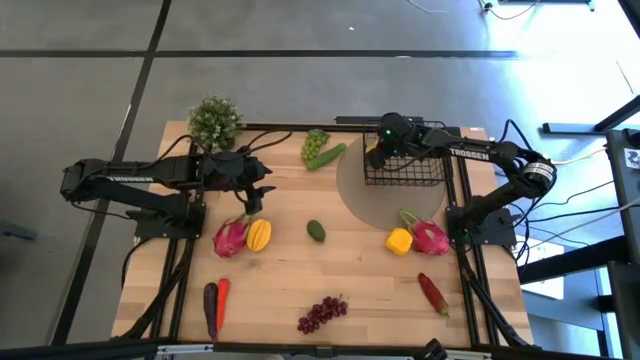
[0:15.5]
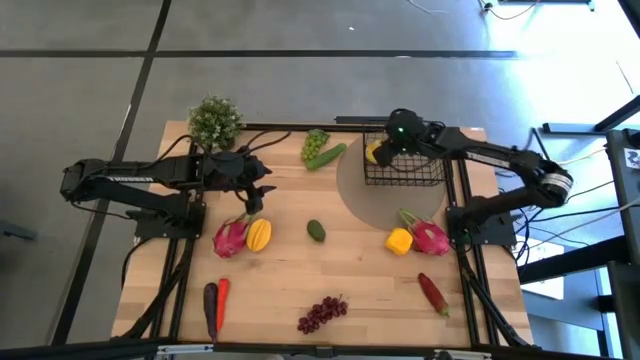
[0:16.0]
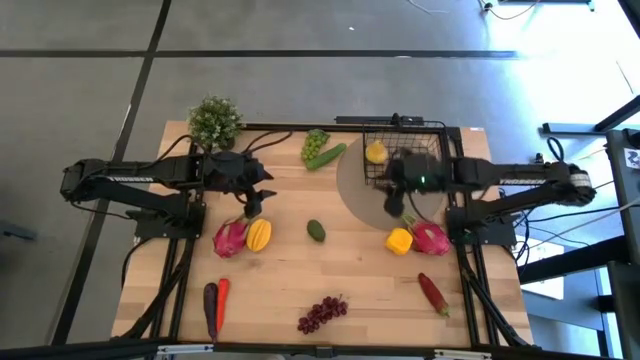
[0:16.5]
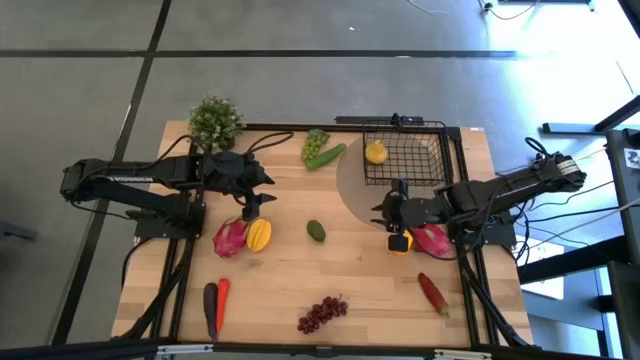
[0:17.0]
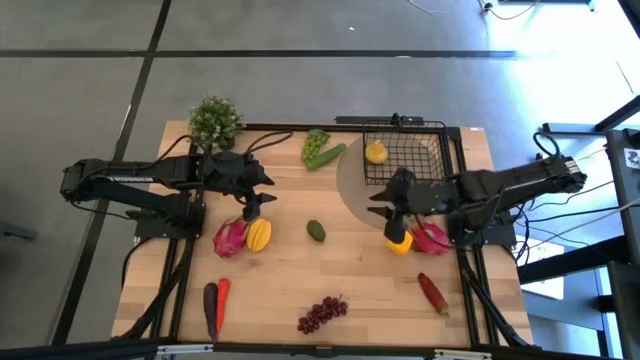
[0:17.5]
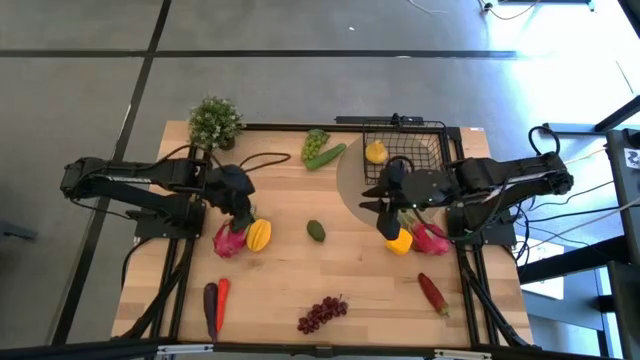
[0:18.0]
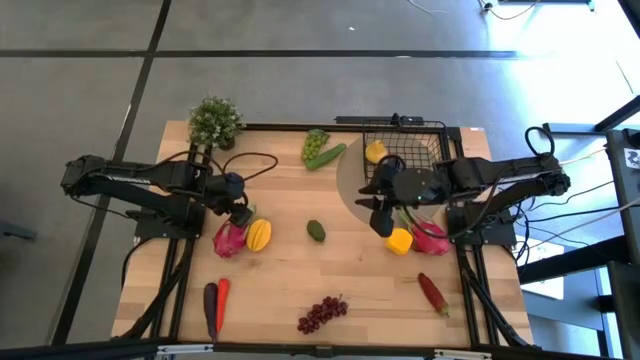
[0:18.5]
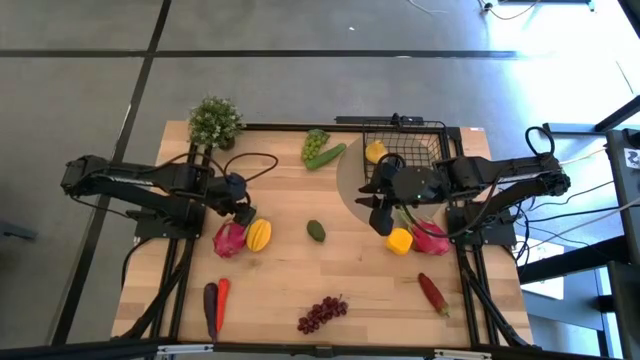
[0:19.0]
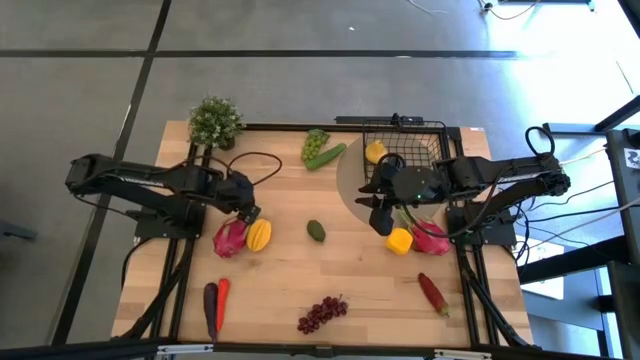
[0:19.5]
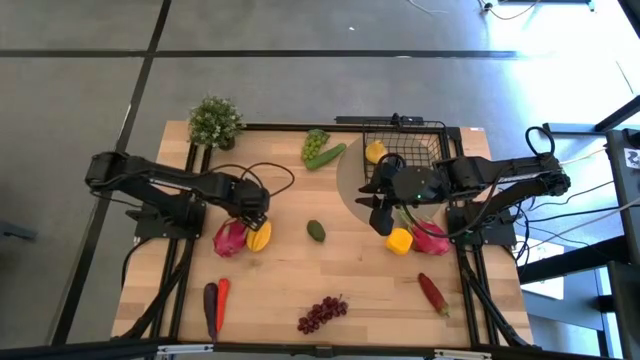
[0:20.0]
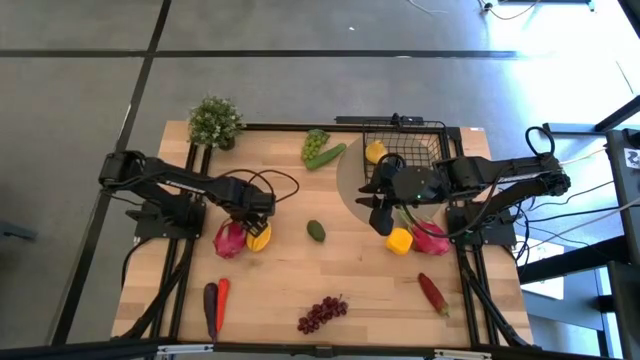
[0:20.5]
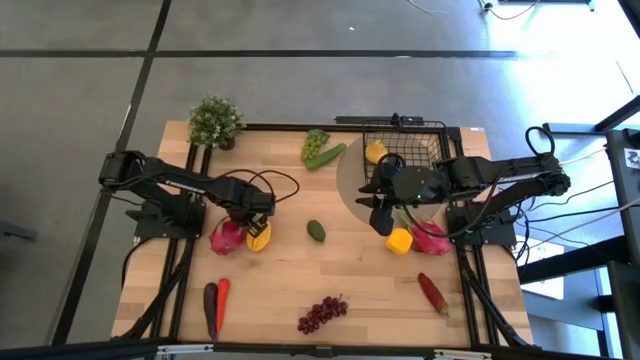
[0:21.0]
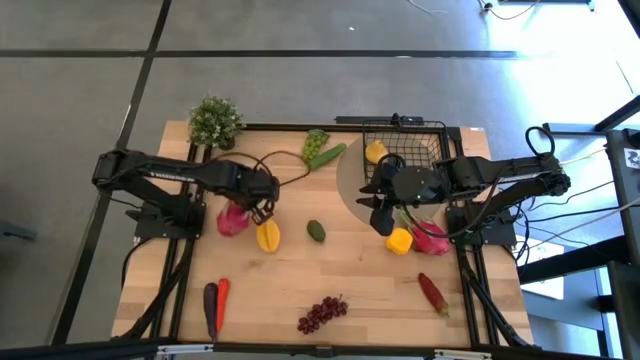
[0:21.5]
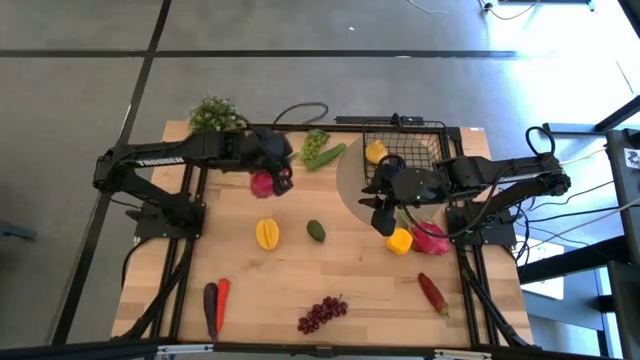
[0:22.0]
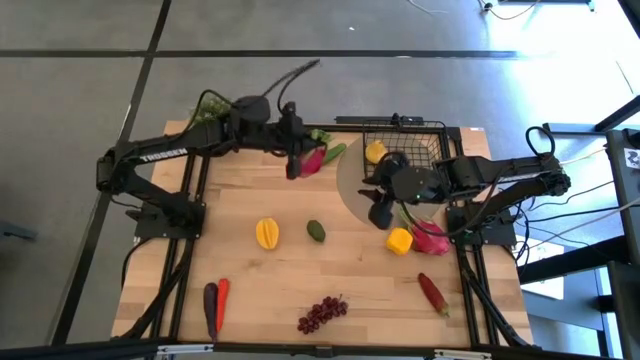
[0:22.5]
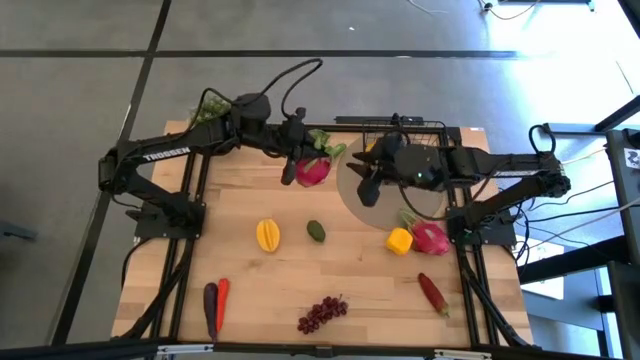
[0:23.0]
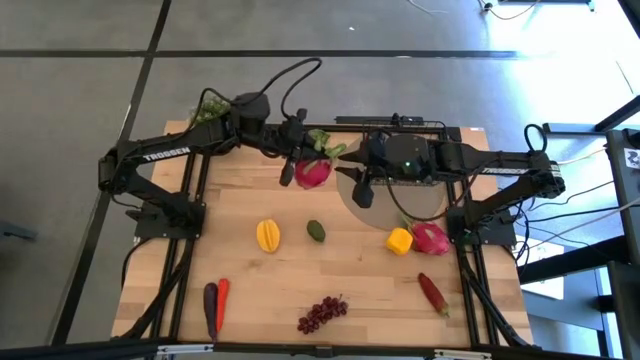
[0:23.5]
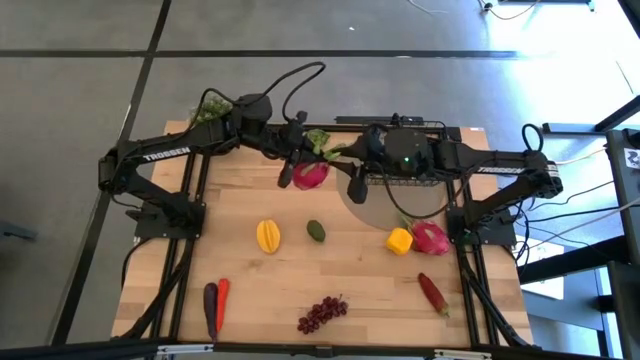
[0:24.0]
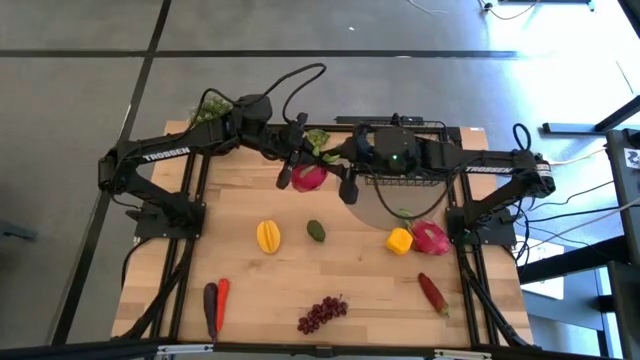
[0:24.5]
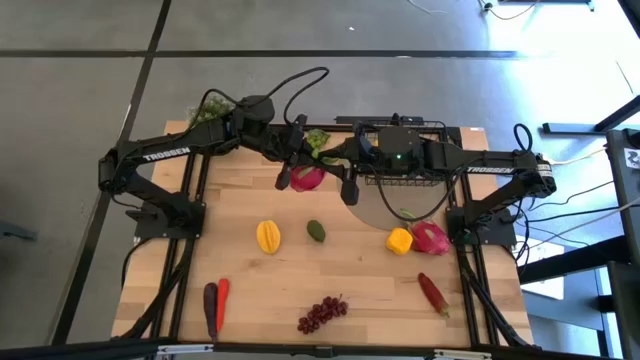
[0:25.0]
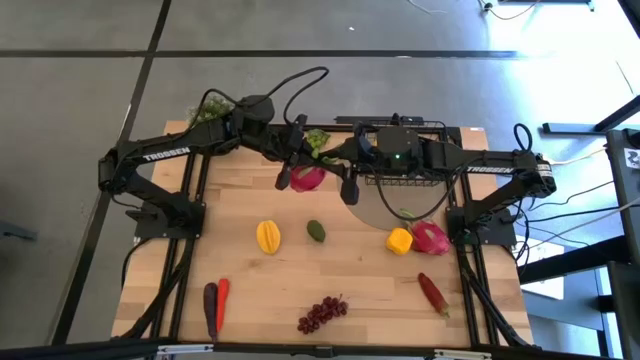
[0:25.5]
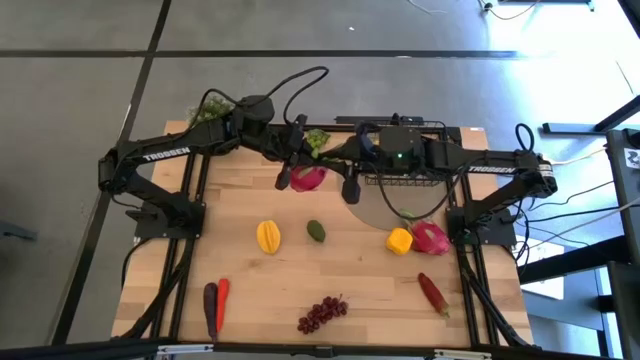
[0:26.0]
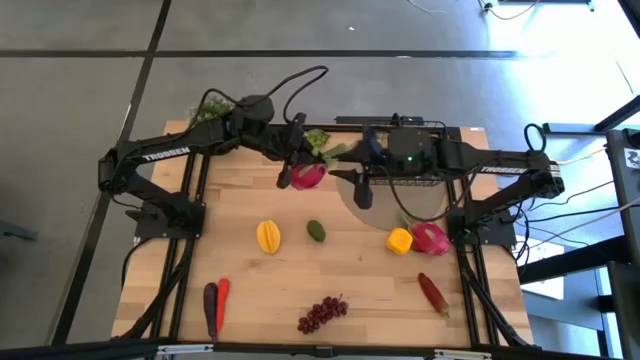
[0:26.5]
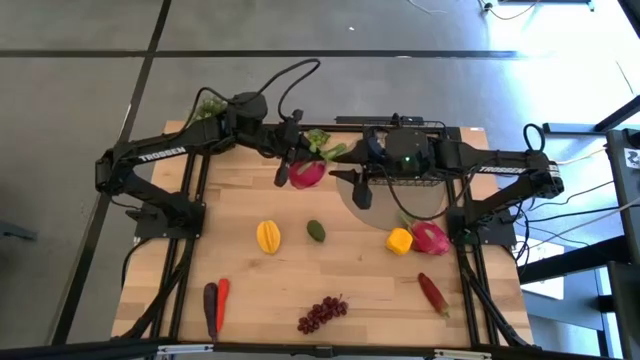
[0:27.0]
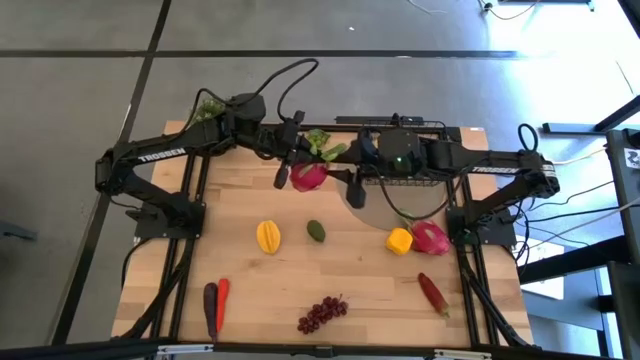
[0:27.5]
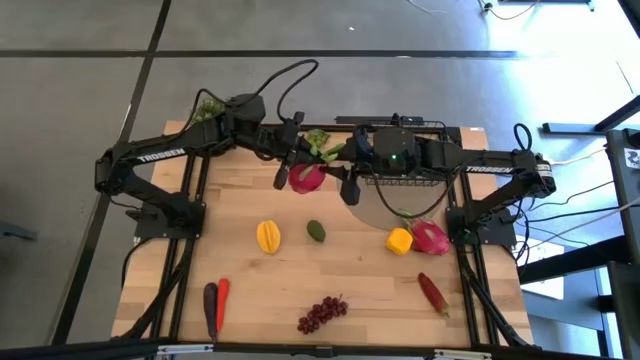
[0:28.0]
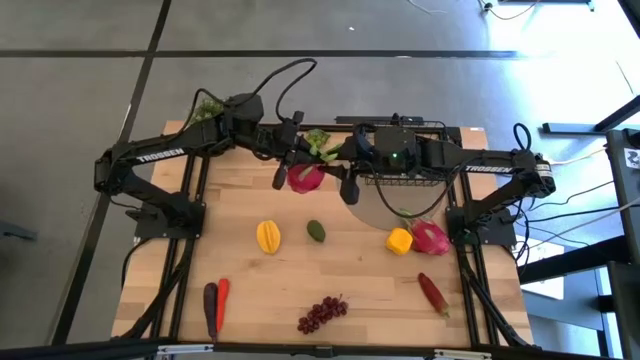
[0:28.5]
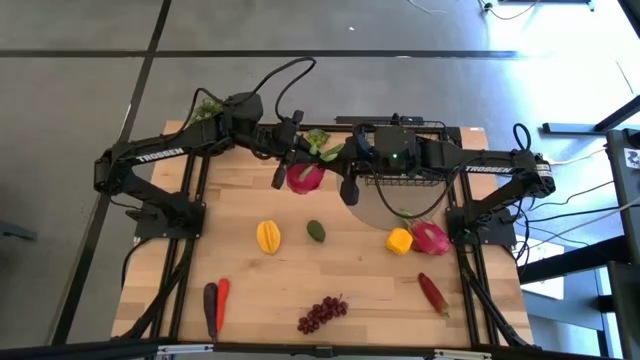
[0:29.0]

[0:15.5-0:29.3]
Task: Build produce basket
Put the left dragon fruit into the wire basket

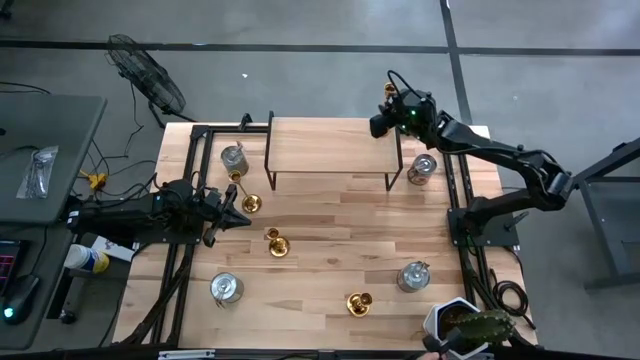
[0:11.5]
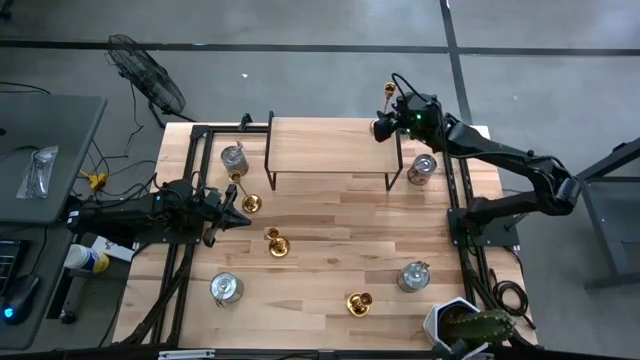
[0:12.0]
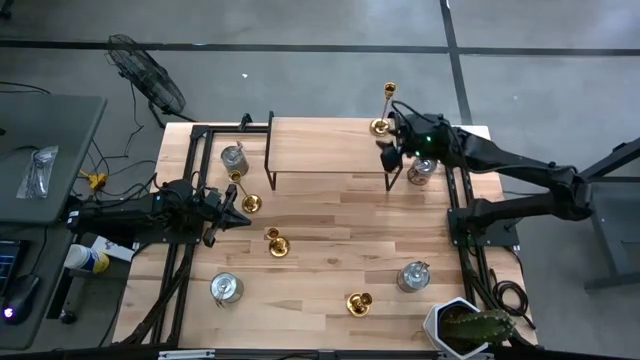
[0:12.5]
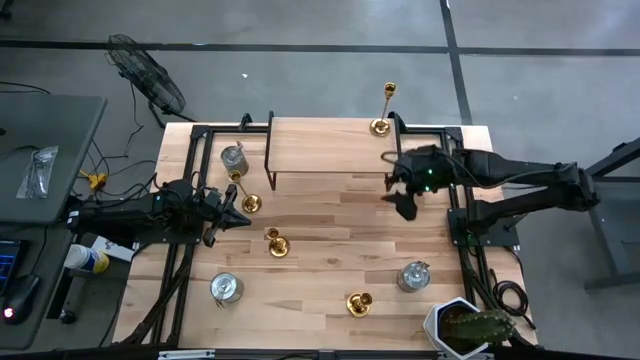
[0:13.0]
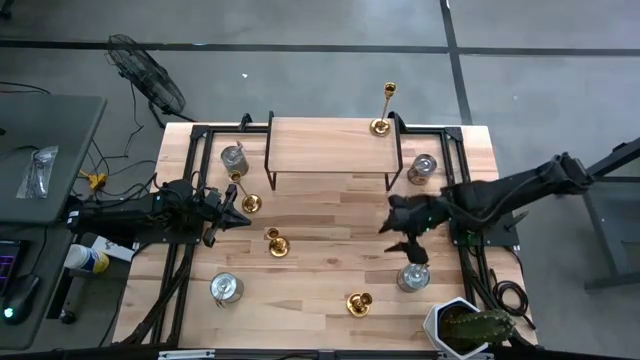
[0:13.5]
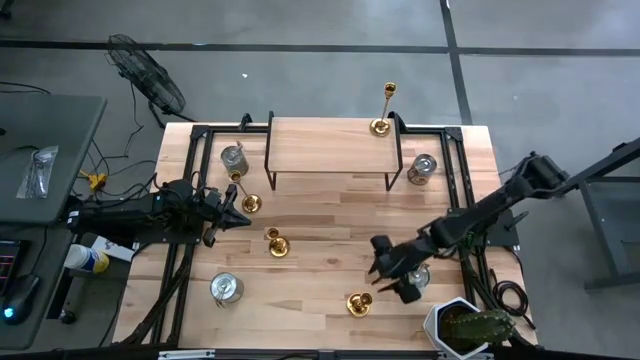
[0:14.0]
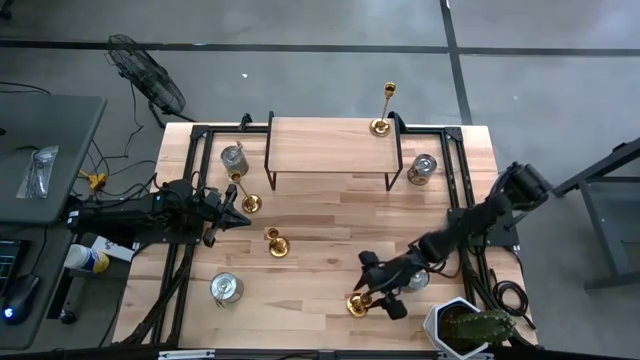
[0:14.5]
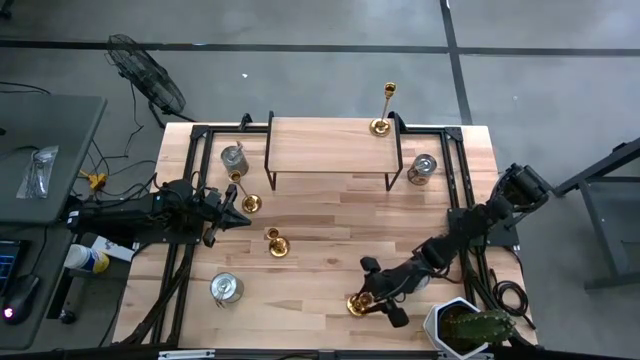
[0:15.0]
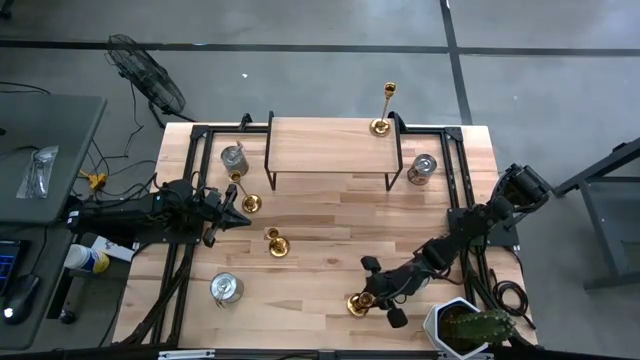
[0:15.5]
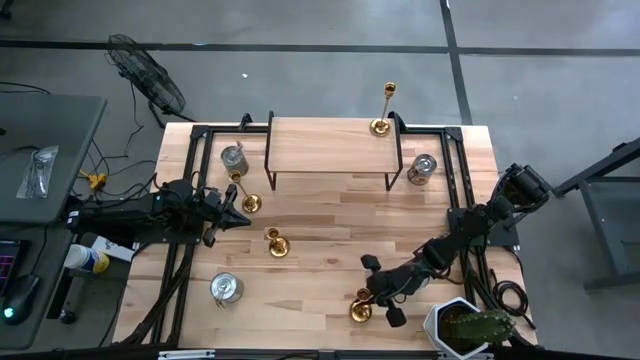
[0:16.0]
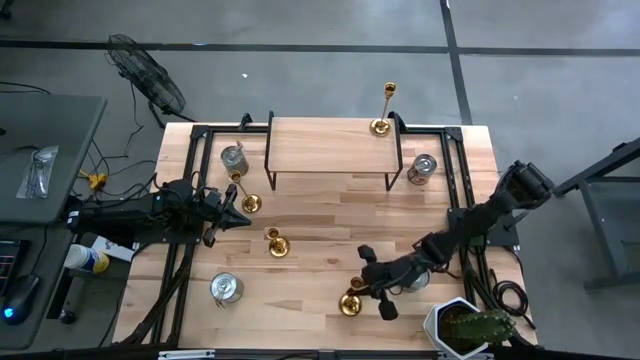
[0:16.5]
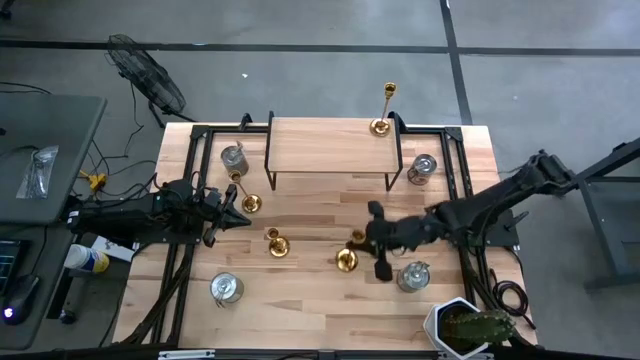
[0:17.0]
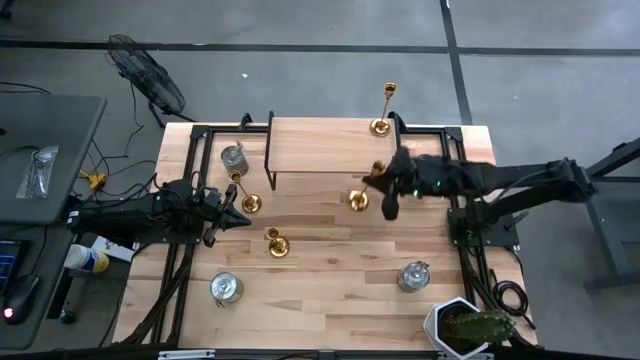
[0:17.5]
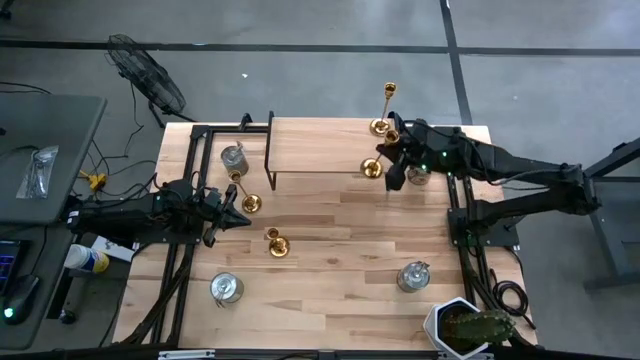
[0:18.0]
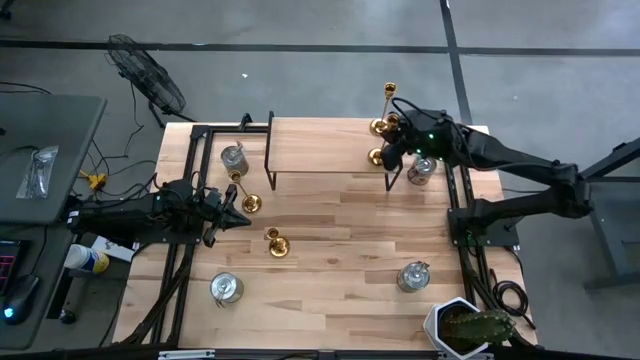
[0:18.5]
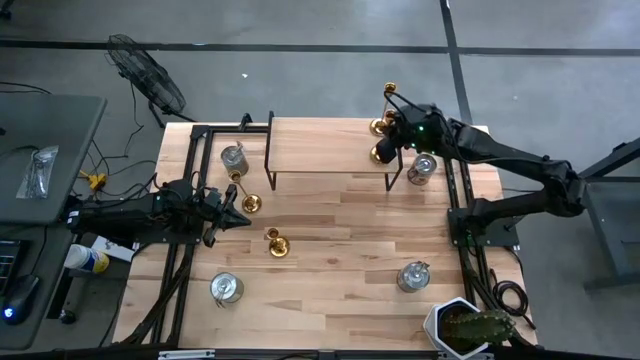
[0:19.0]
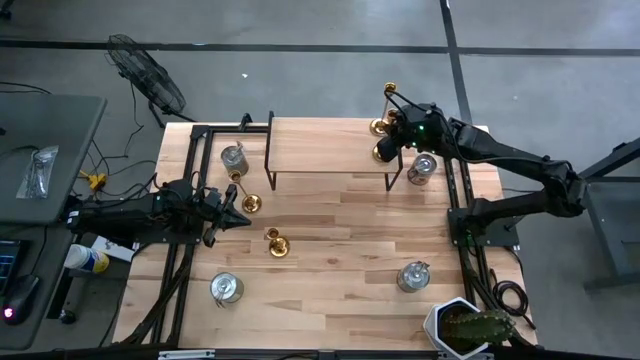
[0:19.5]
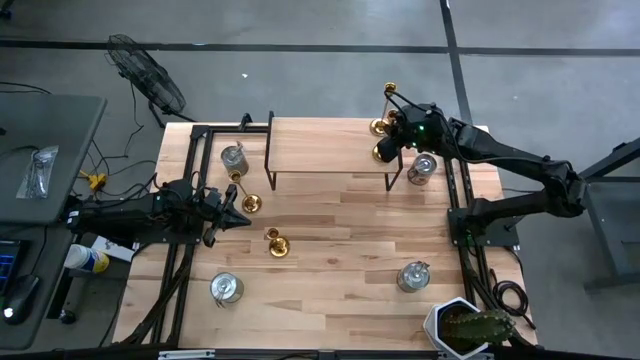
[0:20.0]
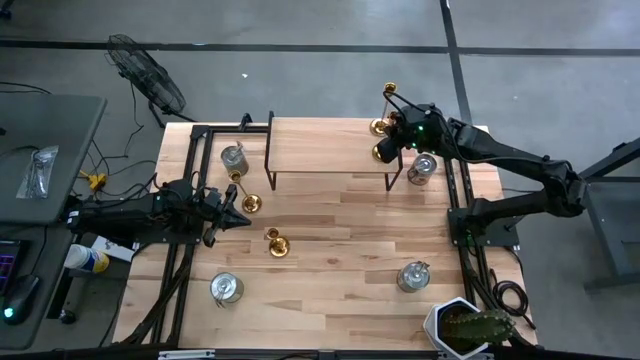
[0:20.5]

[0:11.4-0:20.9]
Task: Pick & Place candle stick holders
Align the gold candle holder on the shelf with the gold candle holder
